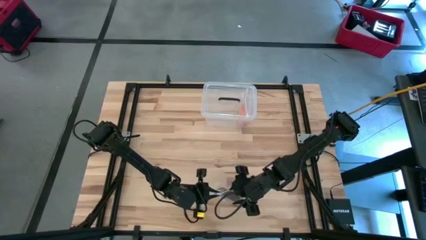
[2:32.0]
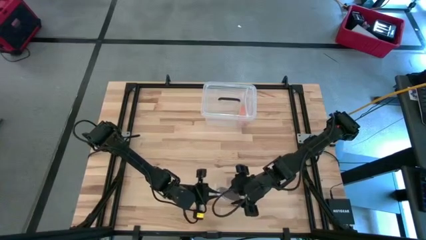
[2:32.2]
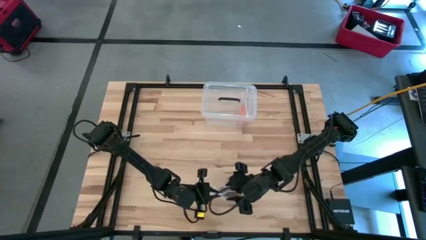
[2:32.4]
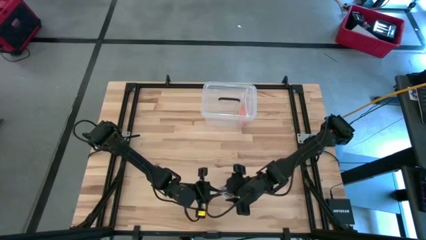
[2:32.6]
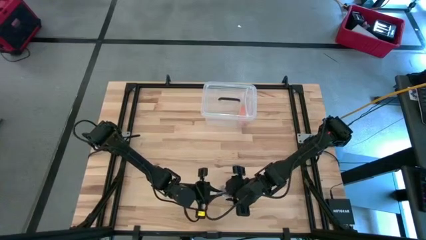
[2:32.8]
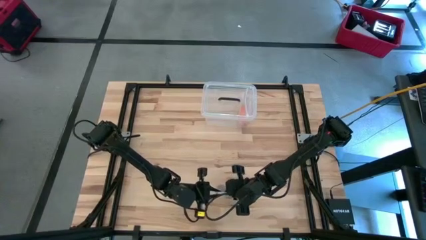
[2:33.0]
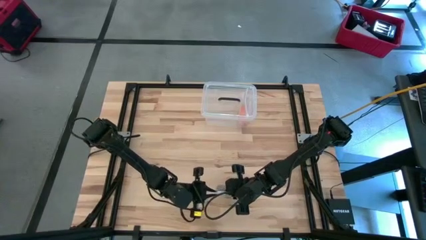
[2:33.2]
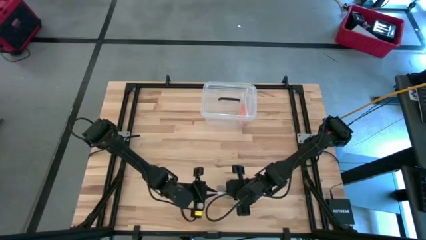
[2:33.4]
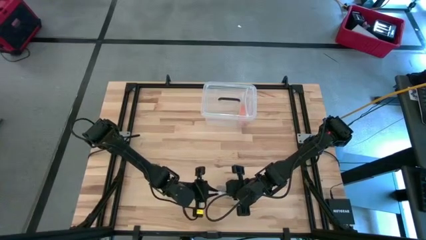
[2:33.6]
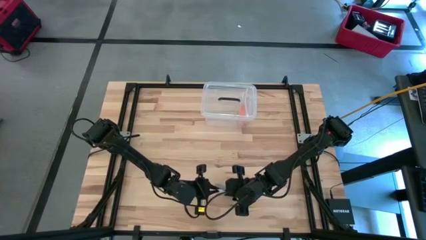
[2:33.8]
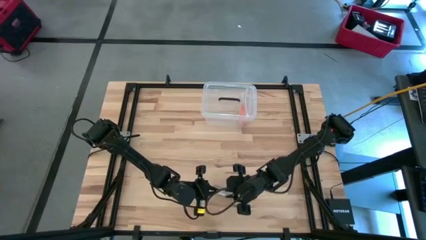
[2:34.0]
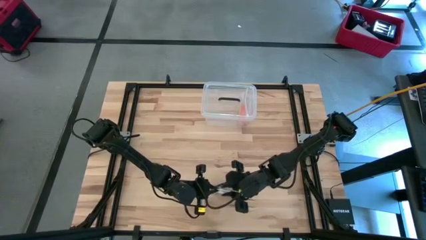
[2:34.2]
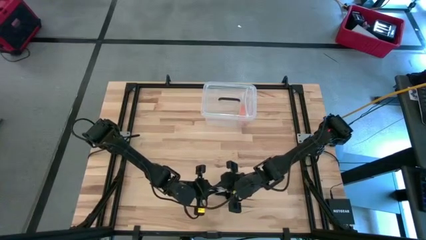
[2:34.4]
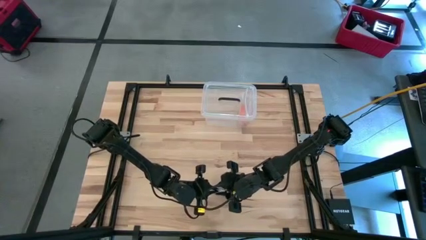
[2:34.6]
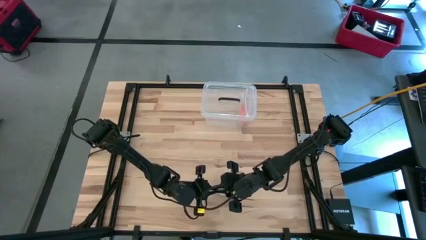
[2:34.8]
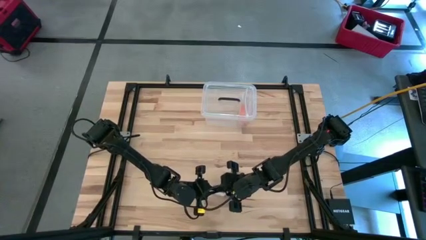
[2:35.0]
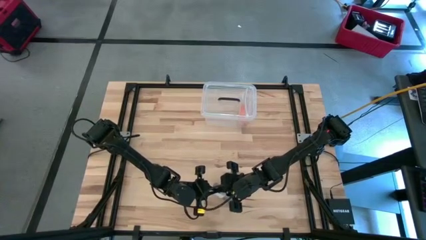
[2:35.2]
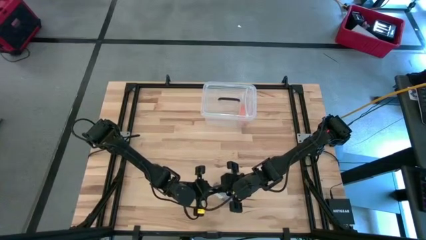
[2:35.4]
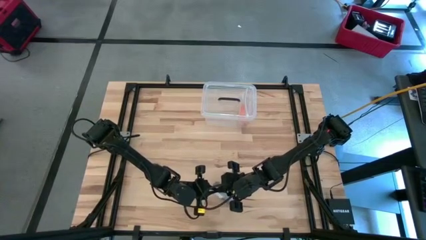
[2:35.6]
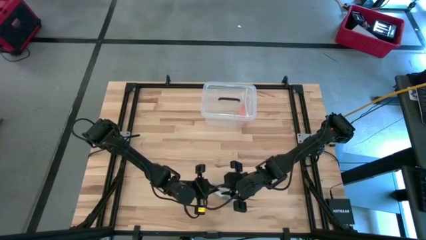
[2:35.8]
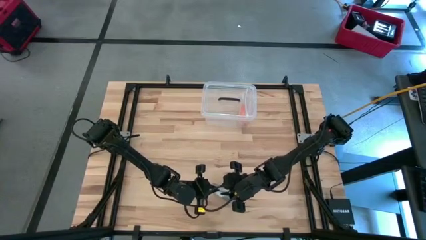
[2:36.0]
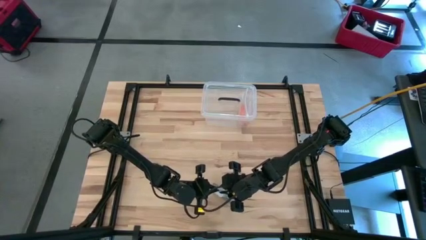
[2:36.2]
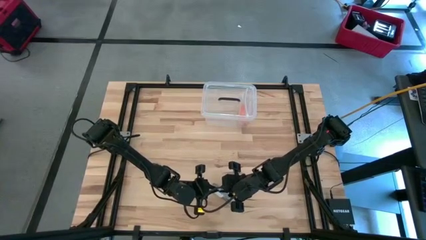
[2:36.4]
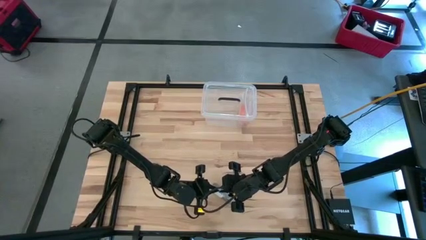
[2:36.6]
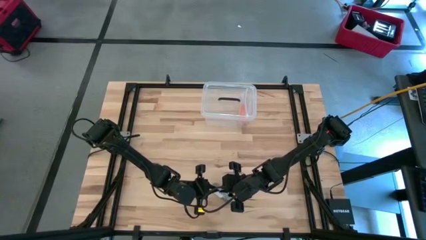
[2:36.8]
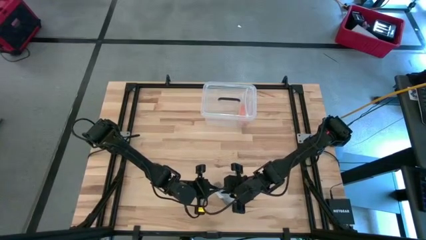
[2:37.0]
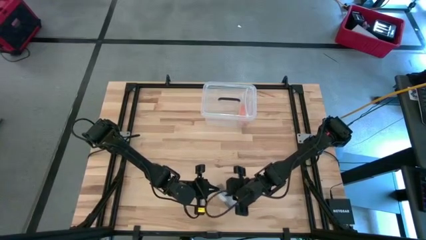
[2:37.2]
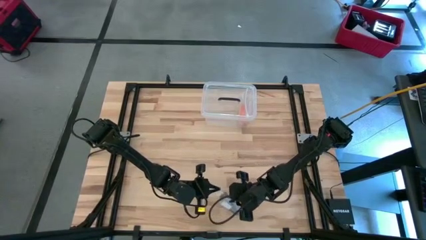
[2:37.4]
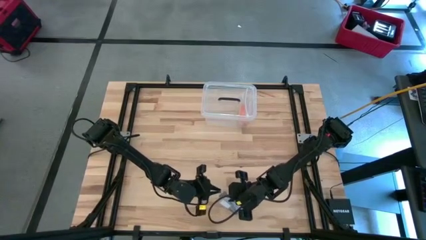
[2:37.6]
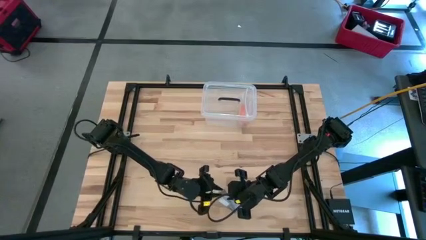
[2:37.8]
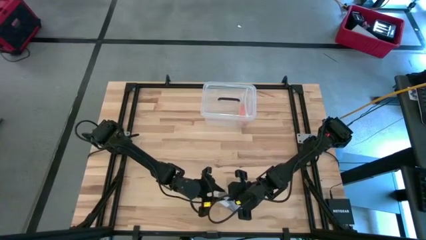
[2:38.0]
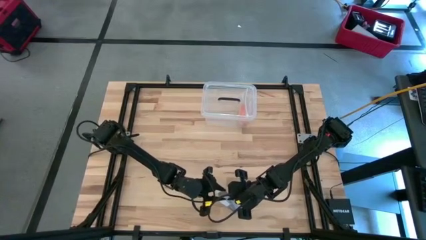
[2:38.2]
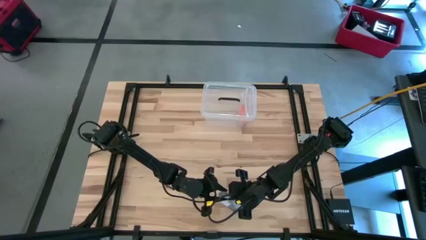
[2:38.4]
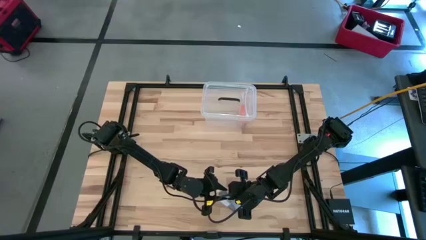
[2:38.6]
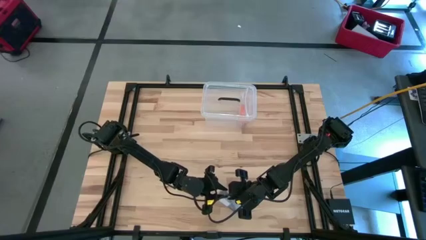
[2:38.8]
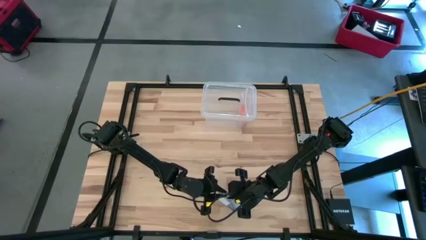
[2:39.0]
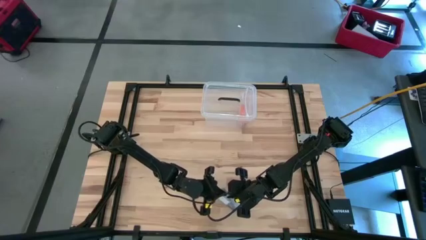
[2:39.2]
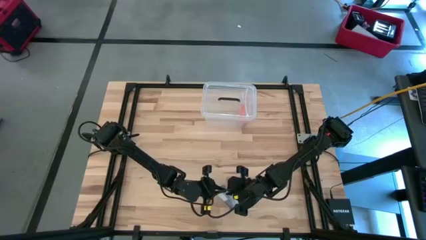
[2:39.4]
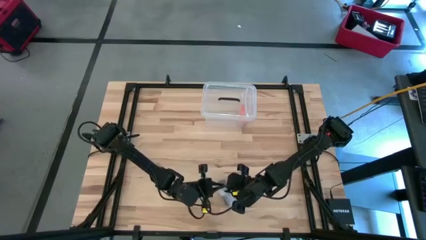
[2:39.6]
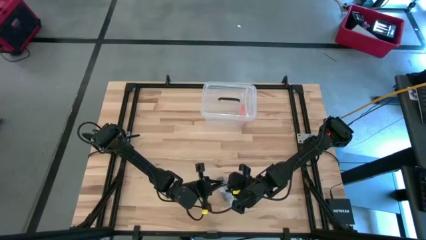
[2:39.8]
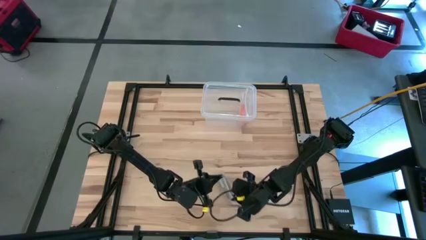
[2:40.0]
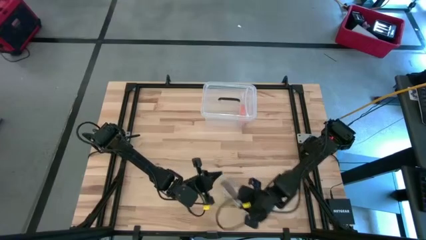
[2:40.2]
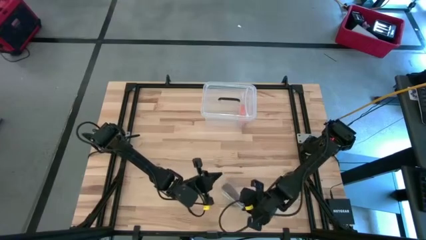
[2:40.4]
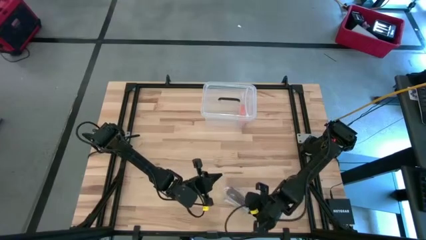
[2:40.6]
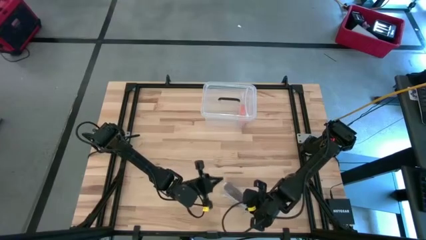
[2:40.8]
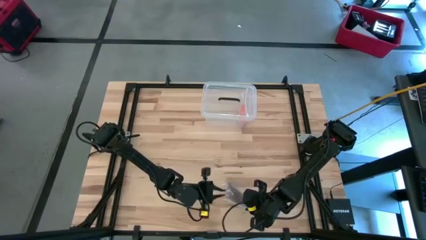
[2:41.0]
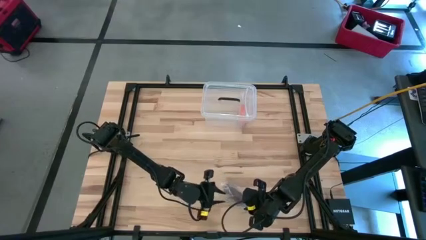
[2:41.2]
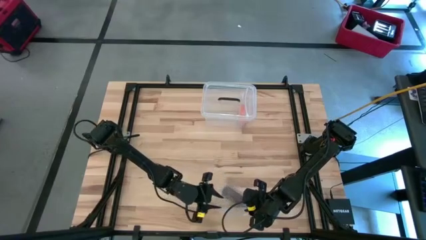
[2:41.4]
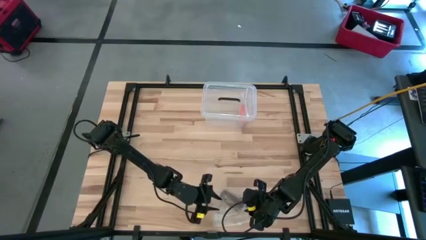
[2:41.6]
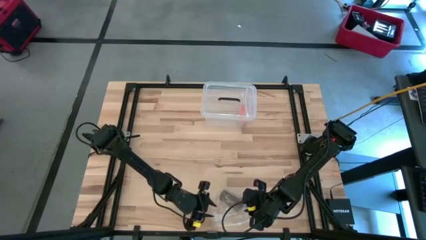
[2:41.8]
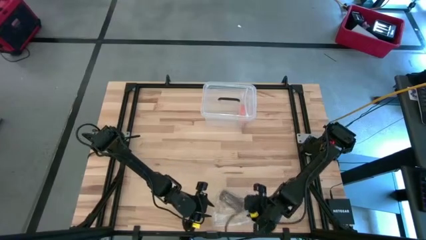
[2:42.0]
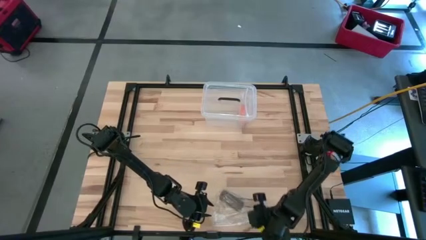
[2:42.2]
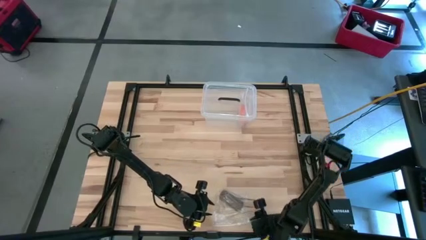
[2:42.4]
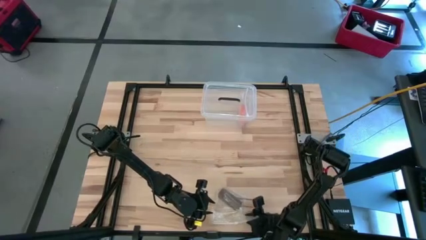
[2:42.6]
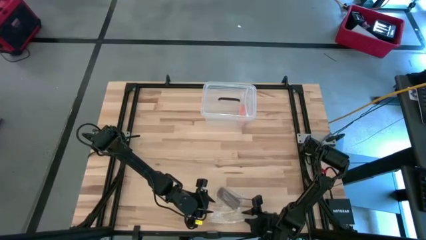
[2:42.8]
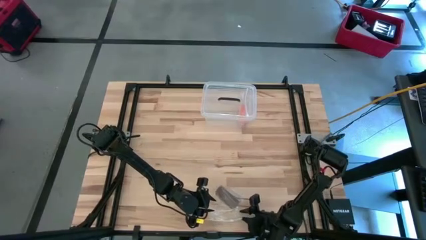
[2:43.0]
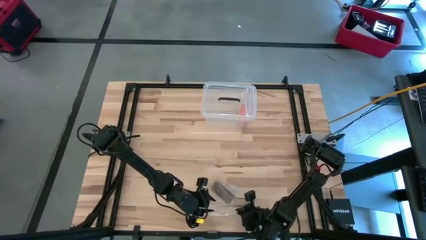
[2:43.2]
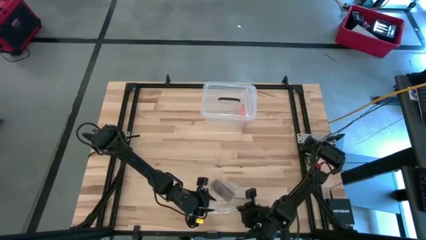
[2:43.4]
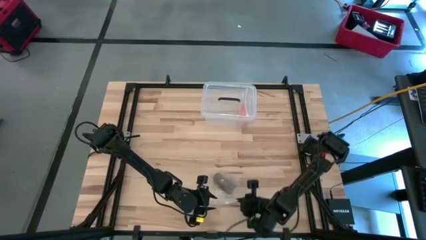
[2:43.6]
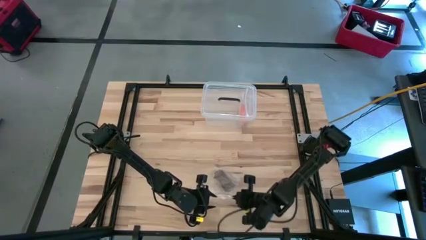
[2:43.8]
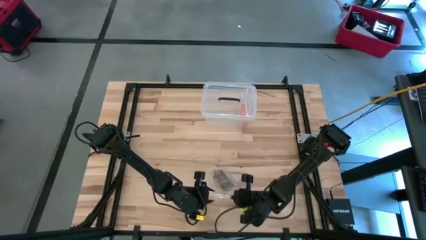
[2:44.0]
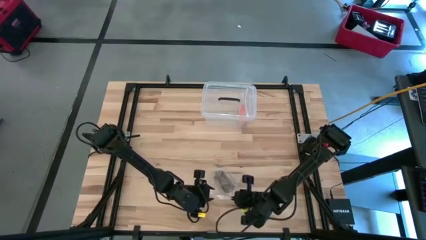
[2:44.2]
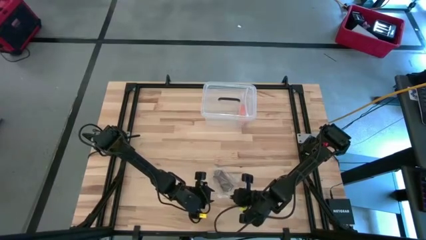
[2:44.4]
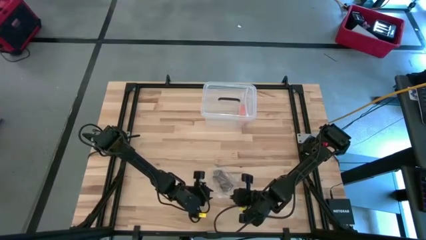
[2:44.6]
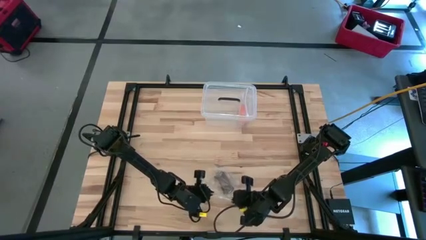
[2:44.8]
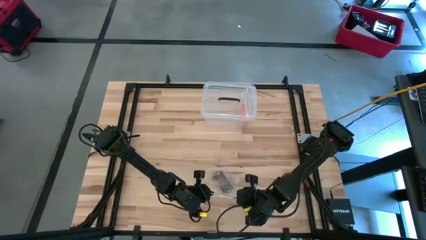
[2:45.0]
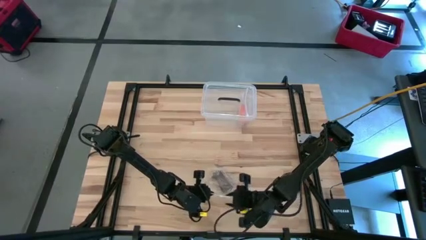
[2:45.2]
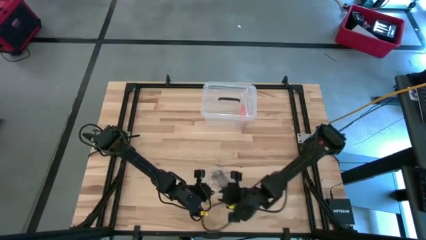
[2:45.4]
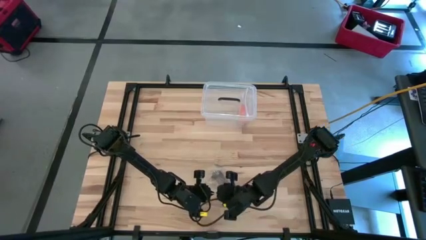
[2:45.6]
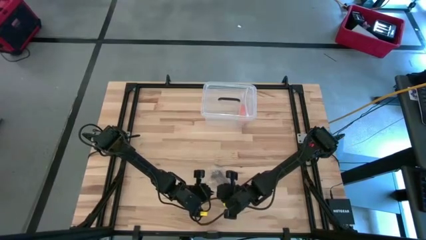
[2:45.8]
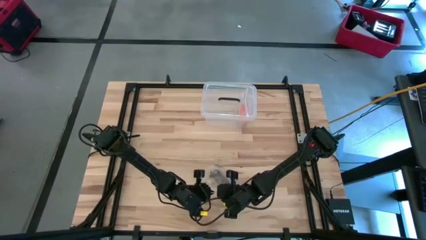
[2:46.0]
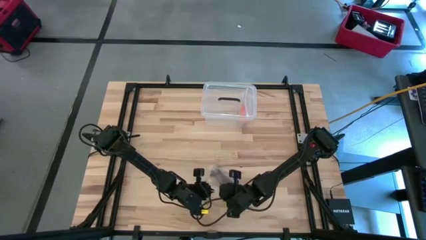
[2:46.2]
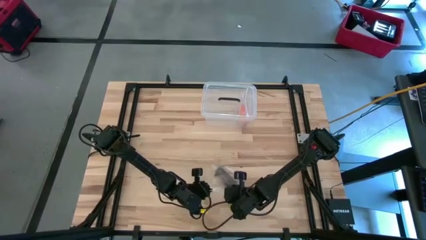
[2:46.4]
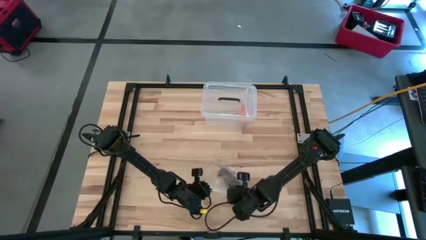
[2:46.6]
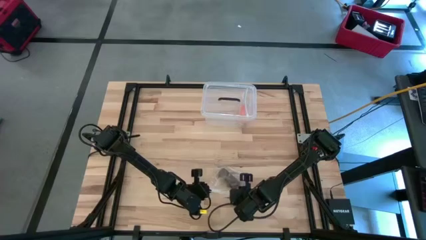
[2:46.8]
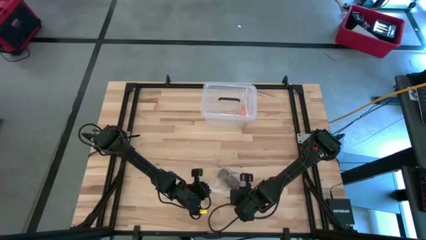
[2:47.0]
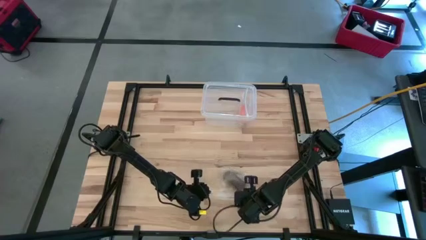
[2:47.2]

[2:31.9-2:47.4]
Task: Roll bandage
Close the transparent zip bag

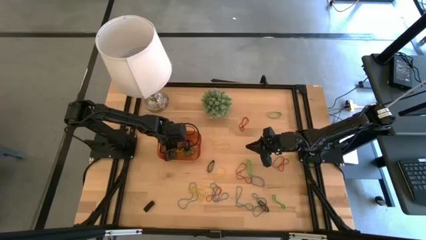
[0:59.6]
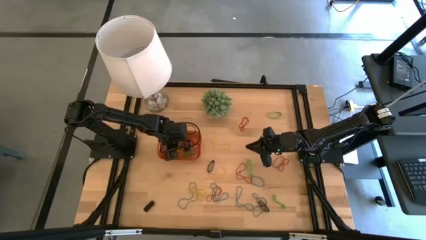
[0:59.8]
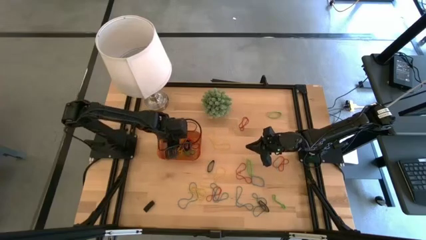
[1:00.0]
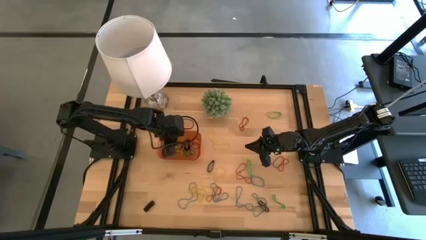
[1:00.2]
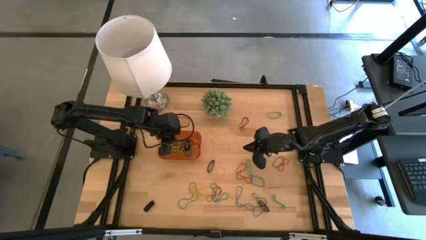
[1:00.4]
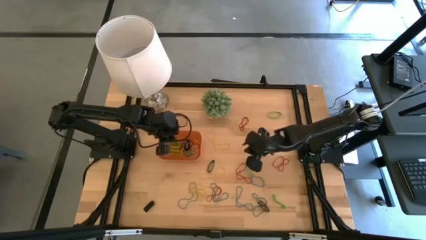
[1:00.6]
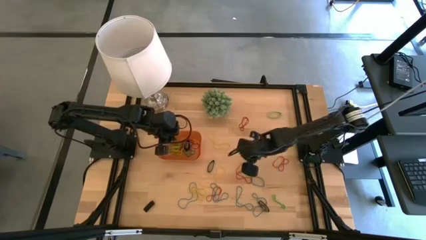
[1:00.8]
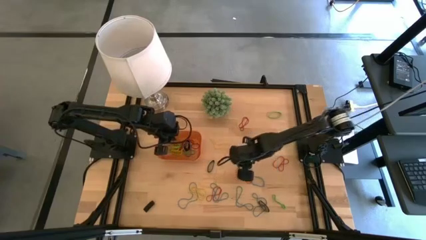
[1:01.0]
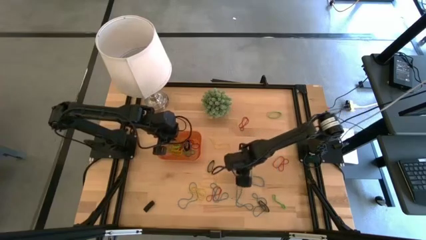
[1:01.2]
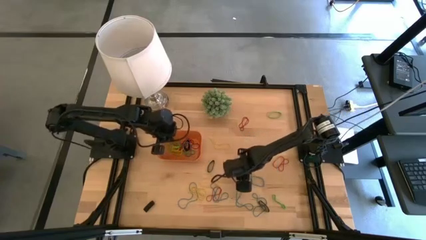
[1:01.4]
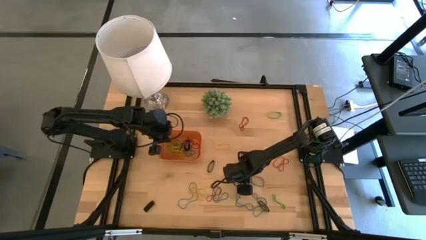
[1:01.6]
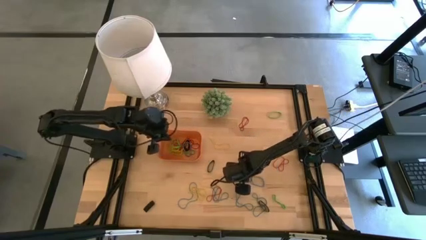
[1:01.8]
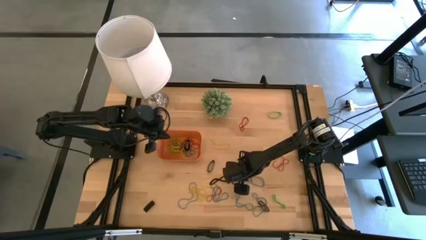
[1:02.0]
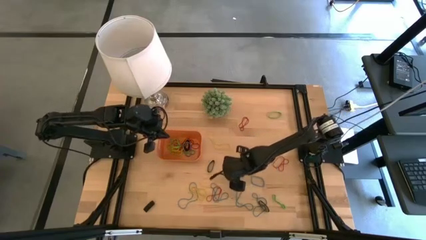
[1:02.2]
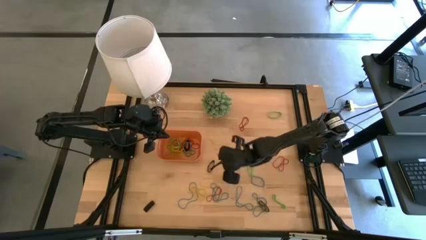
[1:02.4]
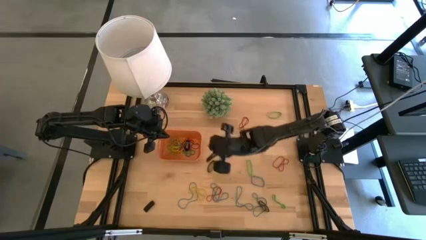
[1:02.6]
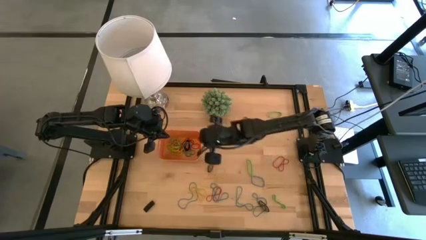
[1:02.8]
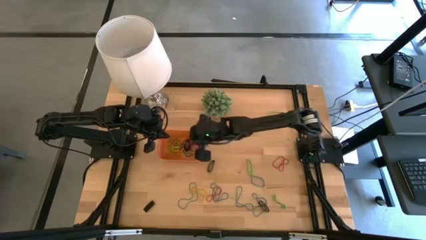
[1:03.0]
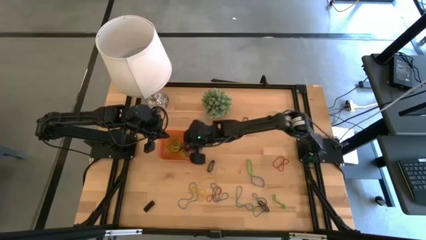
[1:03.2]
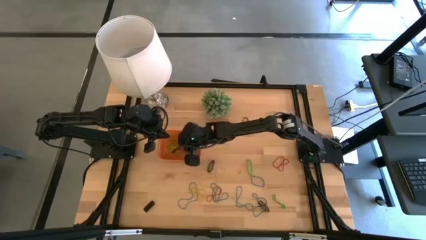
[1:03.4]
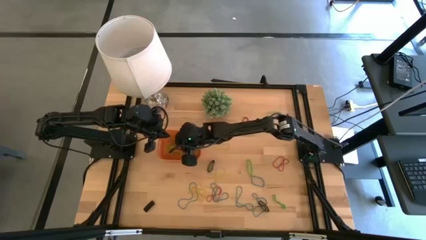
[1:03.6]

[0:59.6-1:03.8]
Task: Pick and place rubber bands into bin
Put the red rubber band into the orange bin
